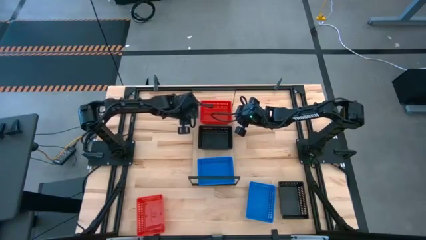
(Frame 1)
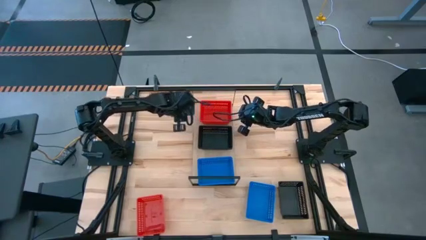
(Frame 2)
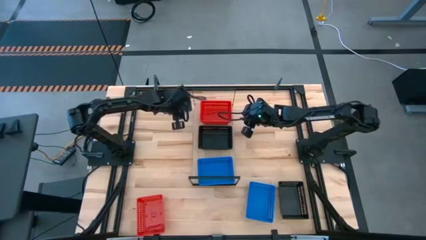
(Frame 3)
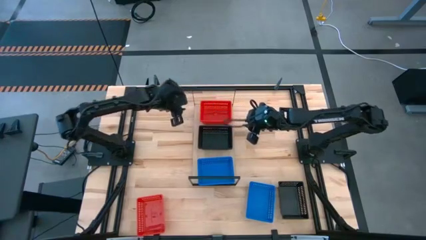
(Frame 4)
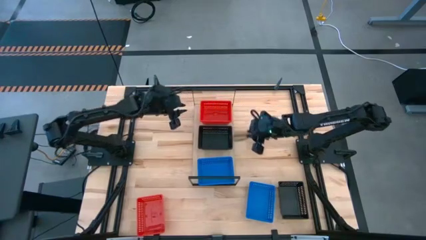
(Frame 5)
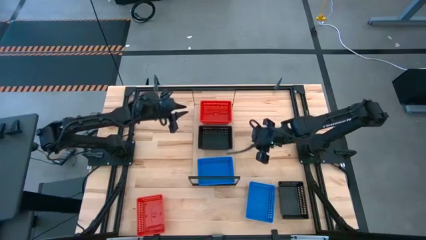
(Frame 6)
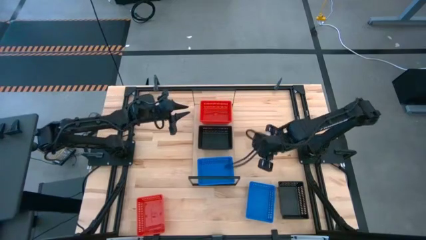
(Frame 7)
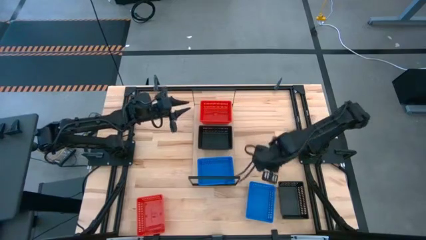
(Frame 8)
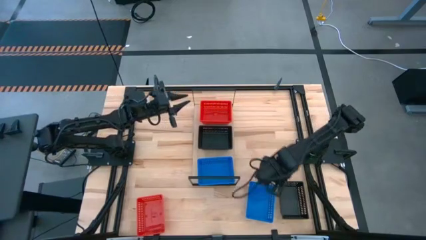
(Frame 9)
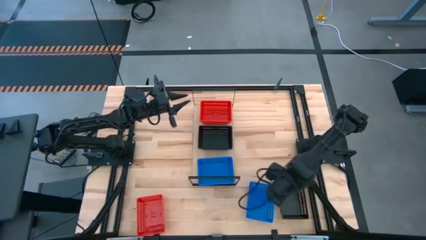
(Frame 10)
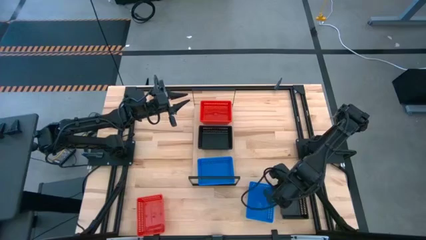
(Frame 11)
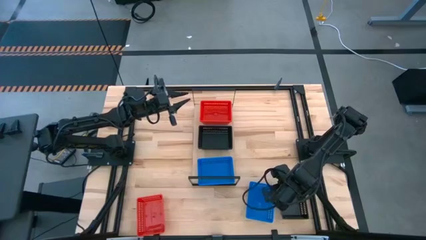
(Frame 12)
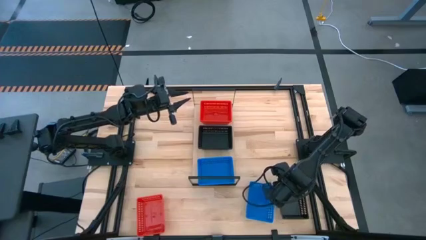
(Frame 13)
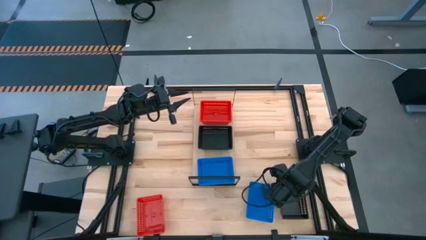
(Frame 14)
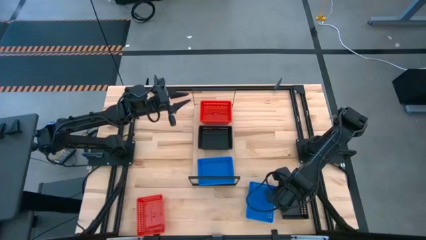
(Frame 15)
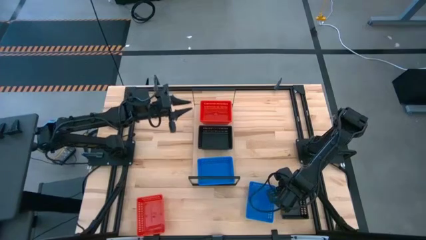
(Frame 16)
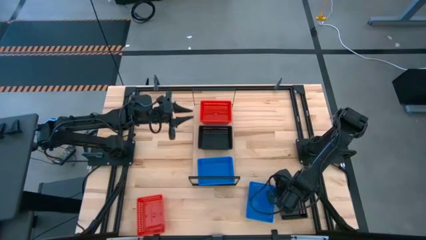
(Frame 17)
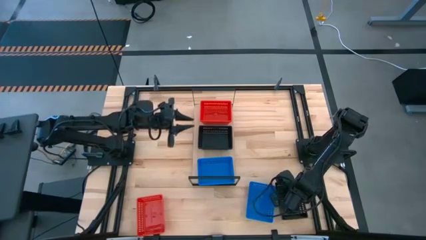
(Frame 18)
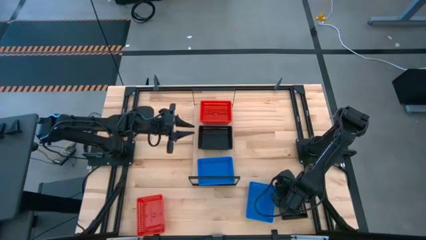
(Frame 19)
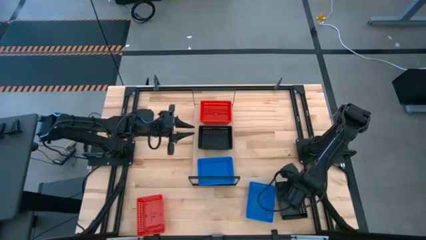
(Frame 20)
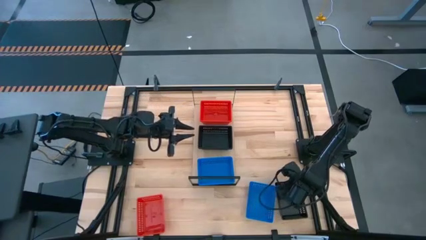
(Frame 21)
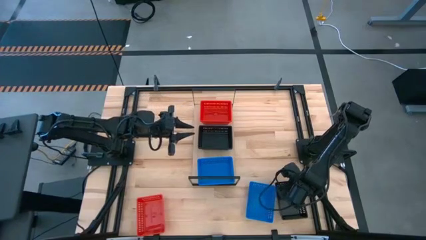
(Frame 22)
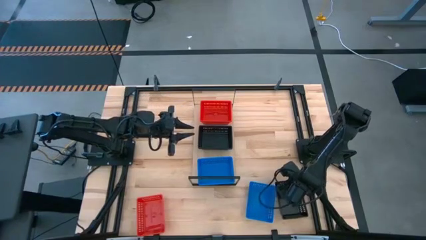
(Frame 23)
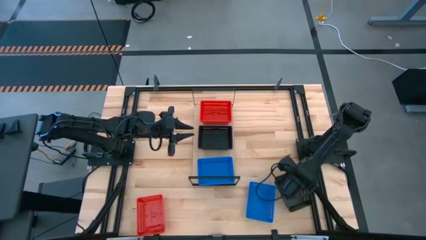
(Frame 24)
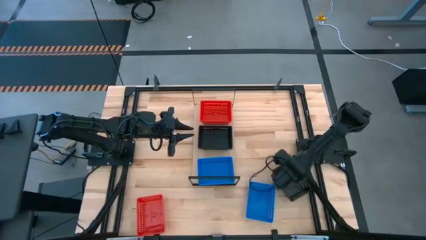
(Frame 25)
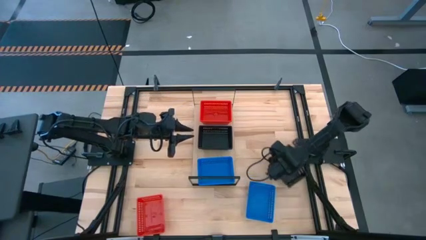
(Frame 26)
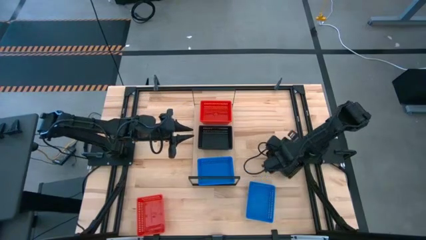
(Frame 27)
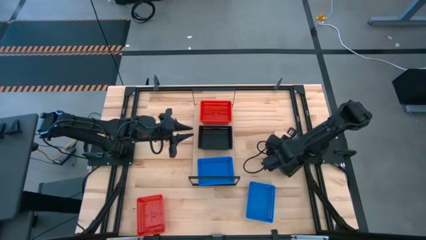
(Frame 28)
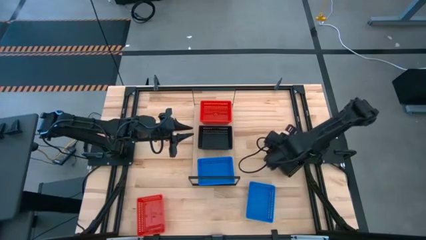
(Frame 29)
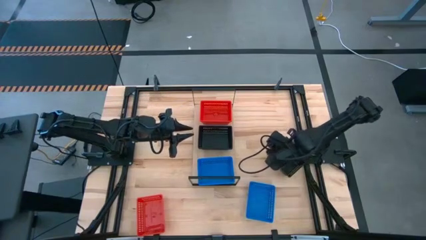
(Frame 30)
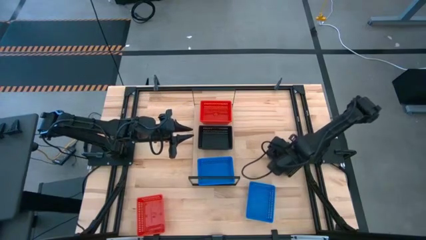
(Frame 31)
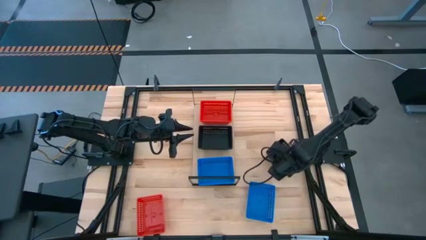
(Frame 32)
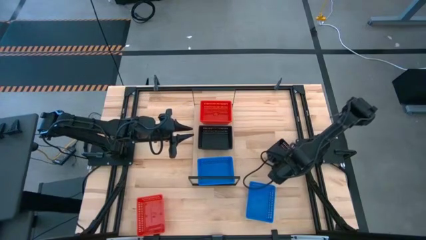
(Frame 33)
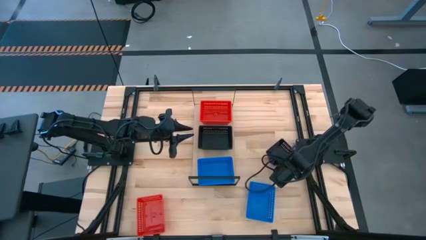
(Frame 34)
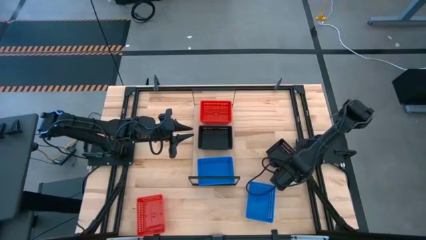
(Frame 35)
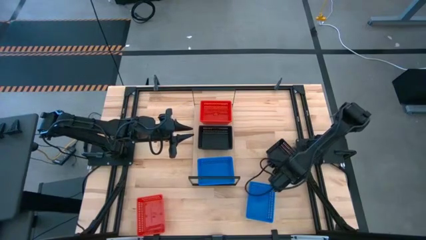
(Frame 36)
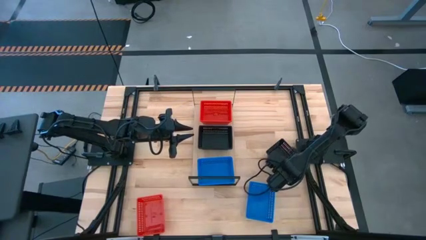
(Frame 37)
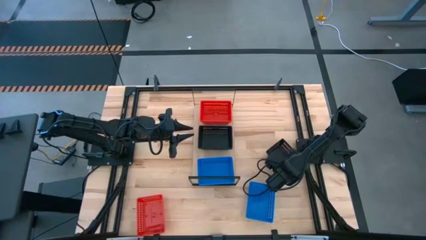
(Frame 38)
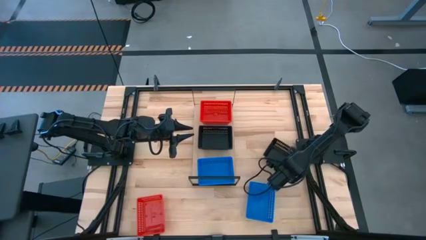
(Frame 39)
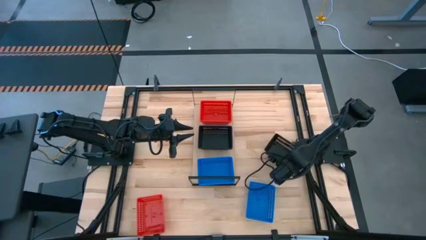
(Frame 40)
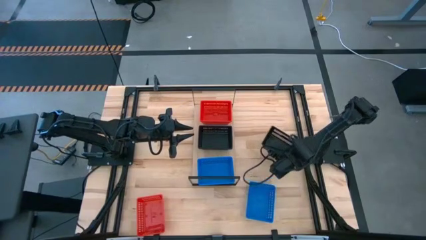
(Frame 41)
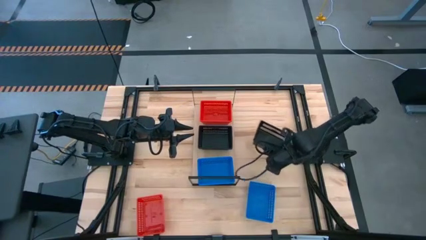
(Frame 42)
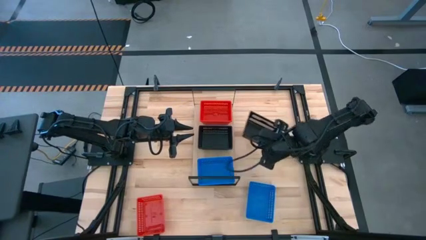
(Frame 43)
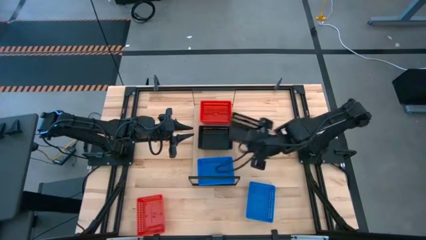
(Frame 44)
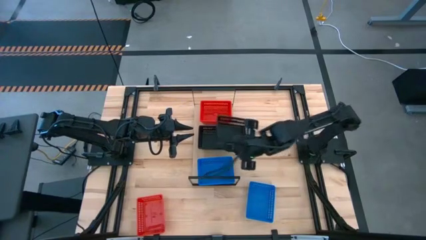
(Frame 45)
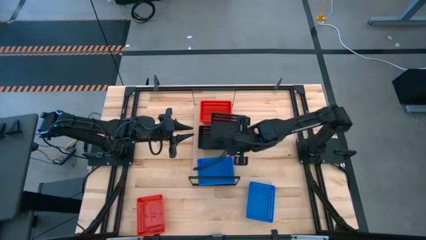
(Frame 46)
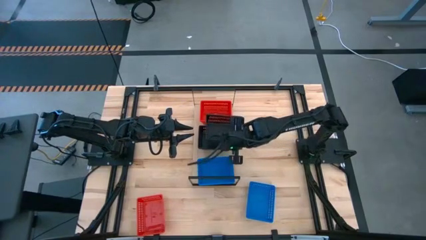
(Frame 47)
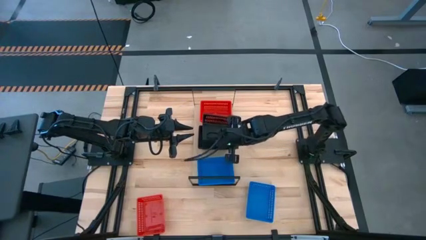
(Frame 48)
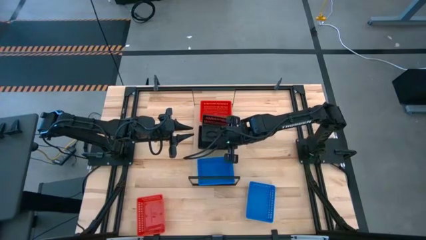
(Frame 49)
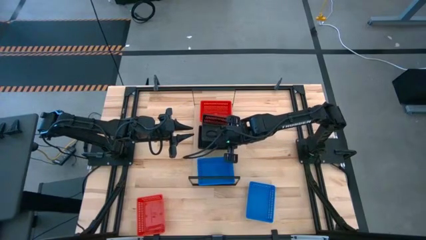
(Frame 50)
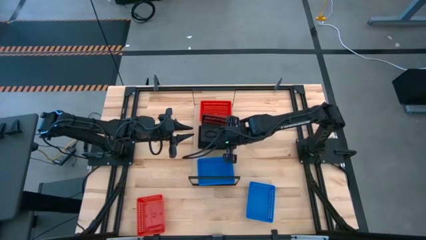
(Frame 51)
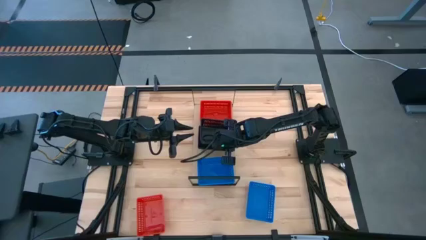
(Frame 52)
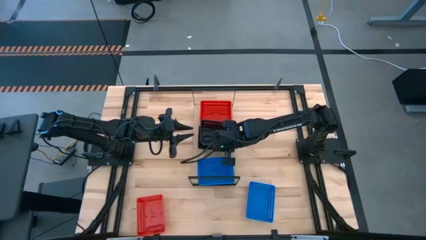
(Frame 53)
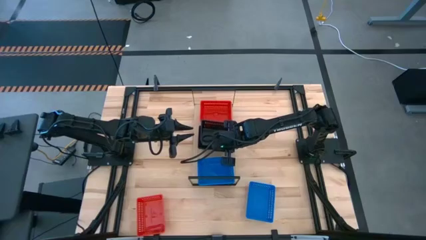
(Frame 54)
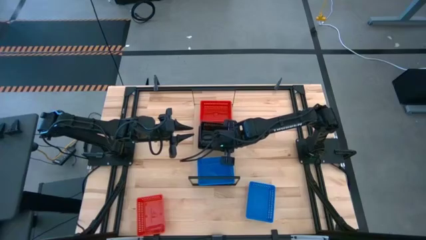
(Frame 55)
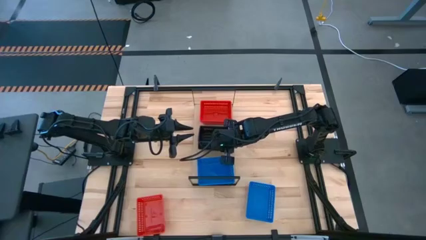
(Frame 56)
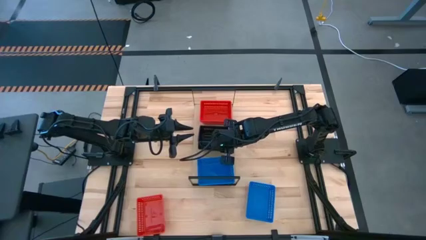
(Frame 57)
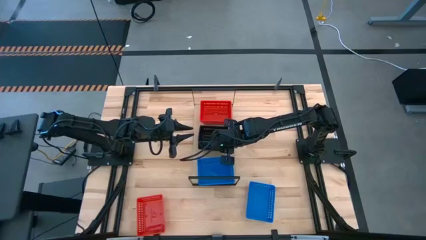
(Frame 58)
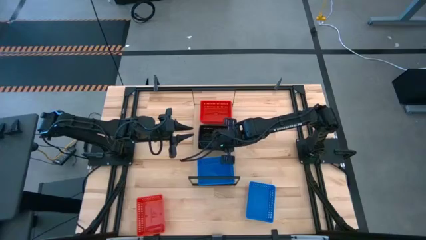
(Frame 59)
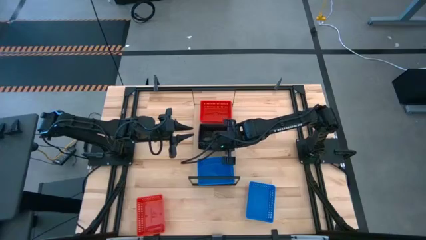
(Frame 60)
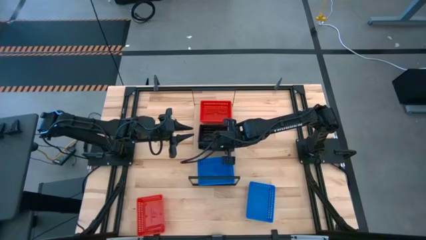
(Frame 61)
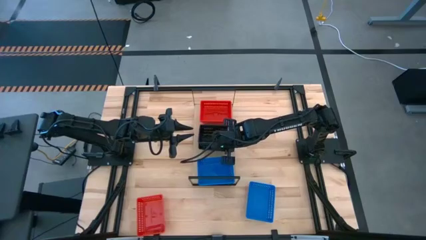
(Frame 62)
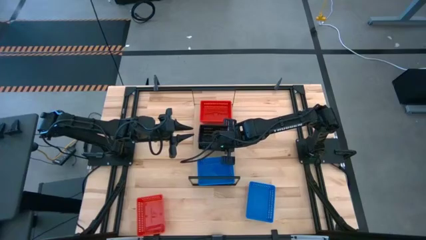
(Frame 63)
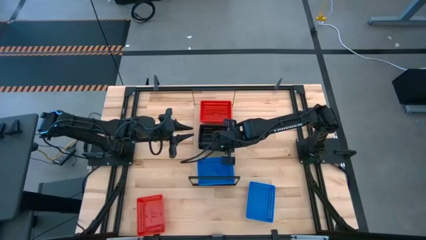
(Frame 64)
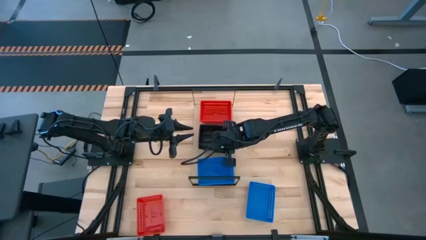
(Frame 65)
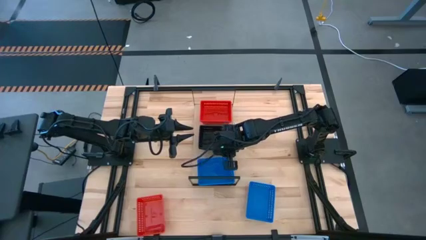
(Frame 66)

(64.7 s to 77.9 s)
Task: Stack baskets on shelf by color
Stack the black bin on top of the black bin on the shelf

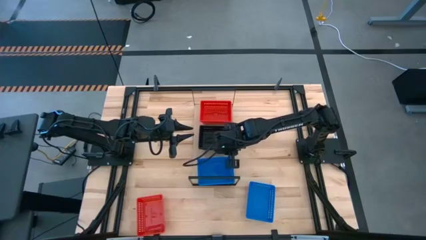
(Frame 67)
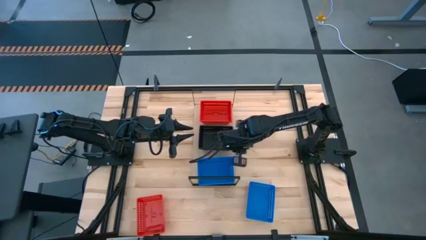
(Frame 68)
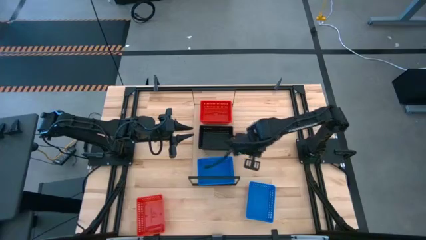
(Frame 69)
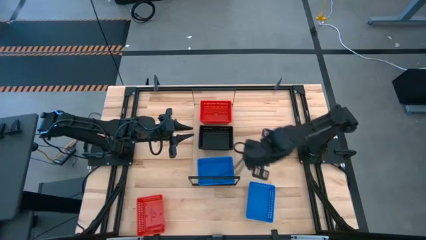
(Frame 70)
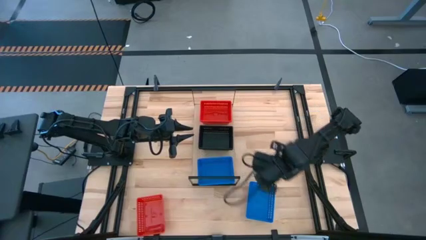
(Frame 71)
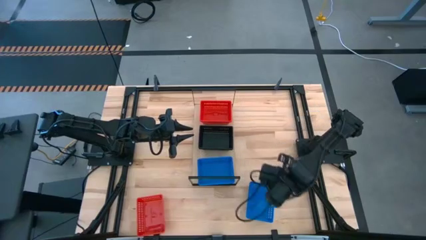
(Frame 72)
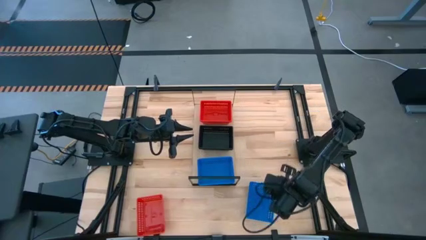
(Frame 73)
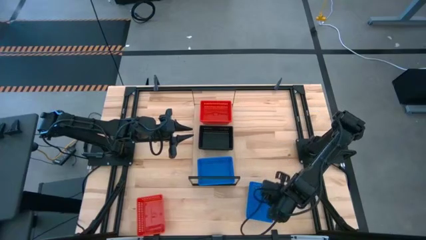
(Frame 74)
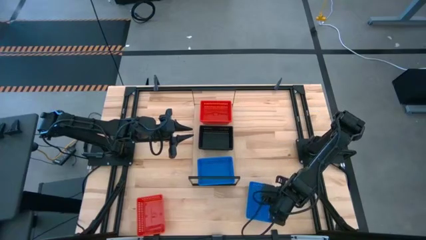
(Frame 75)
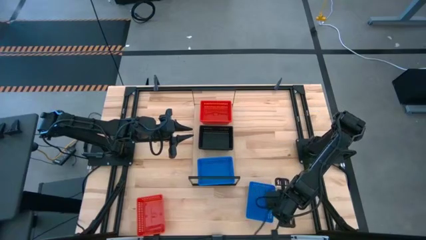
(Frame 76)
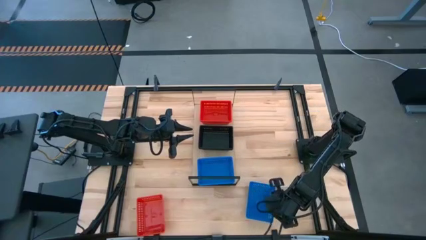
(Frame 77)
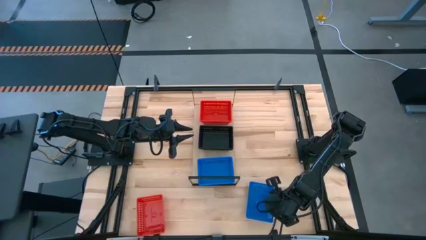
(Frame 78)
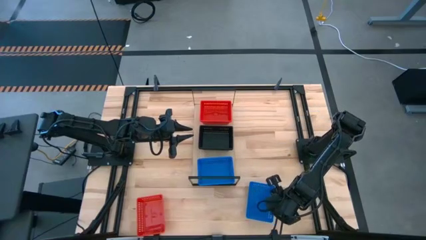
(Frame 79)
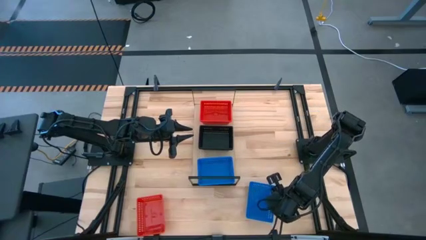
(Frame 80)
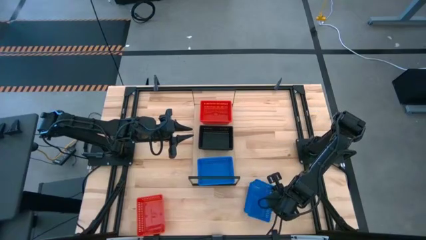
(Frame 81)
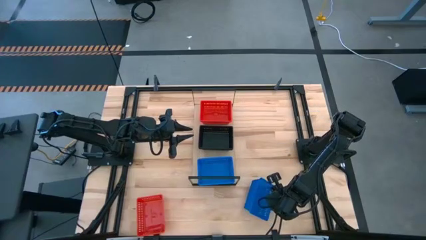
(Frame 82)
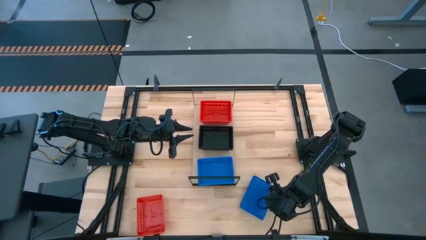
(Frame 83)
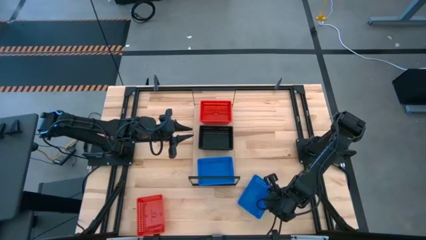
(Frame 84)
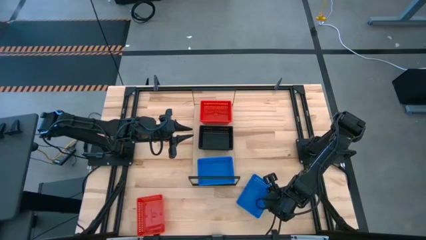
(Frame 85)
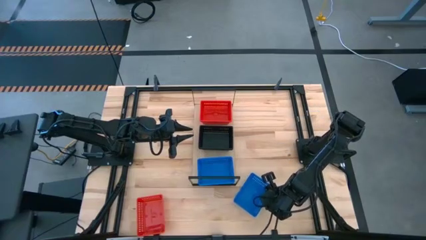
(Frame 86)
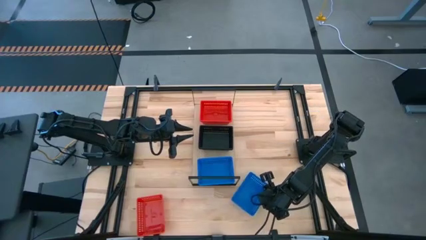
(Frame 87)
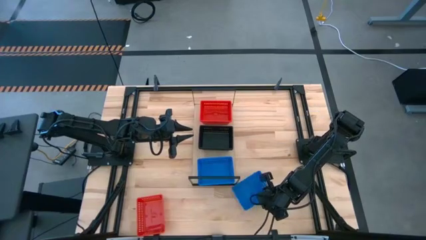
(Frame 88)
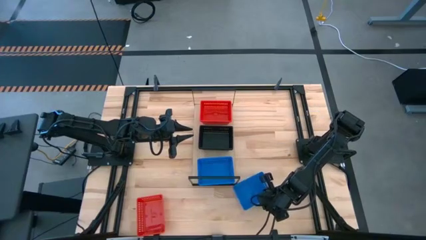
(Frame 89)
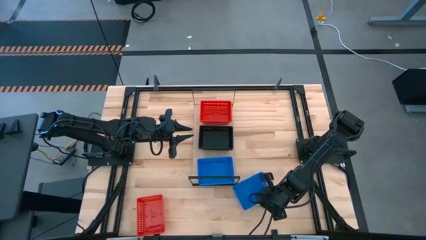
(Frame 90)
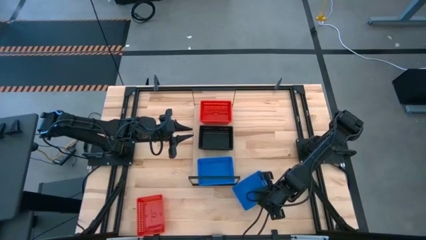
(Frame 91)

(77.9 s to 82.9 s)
Stack the blue bin on top of the blue bin on the shelf
